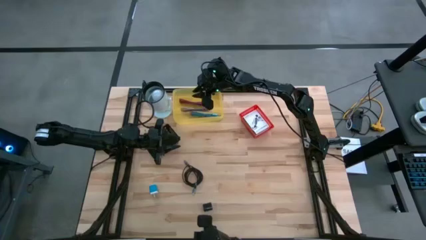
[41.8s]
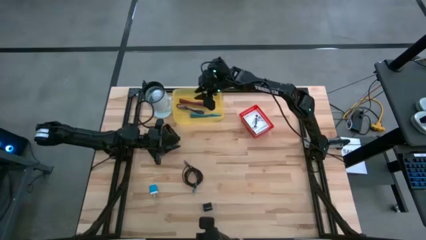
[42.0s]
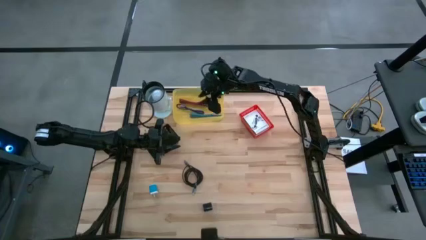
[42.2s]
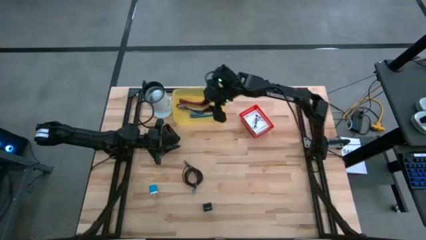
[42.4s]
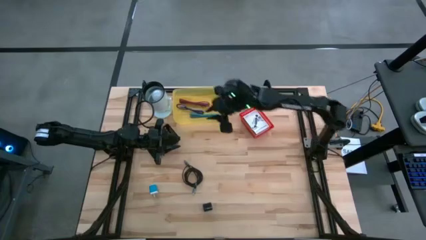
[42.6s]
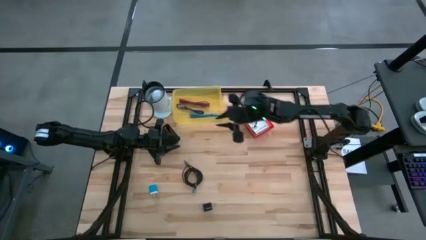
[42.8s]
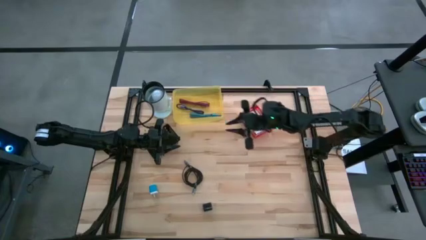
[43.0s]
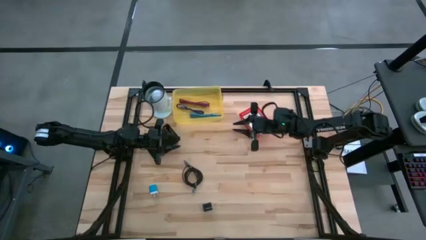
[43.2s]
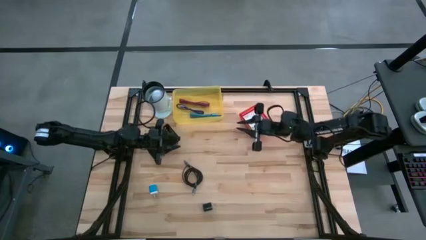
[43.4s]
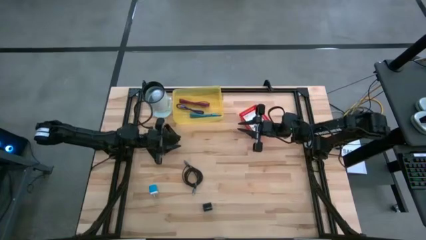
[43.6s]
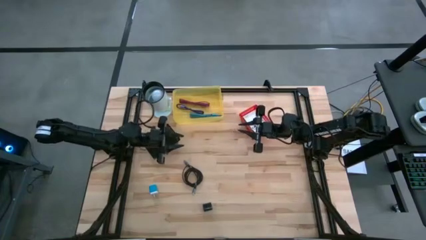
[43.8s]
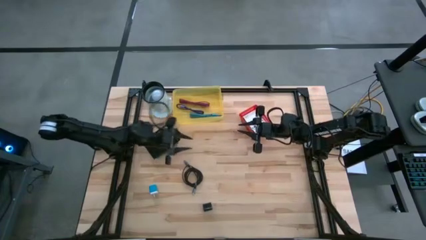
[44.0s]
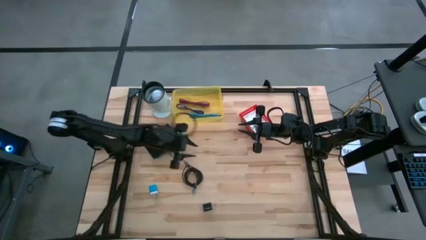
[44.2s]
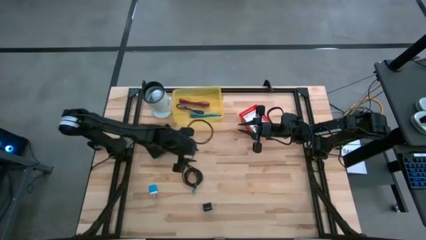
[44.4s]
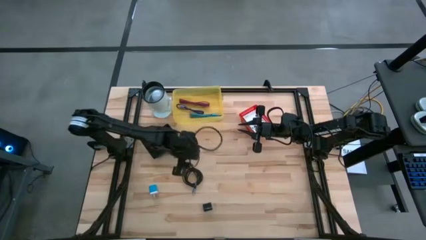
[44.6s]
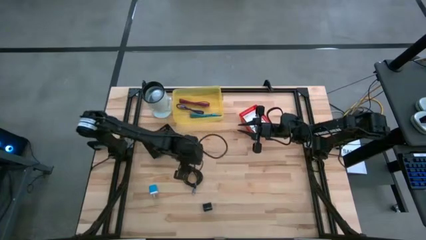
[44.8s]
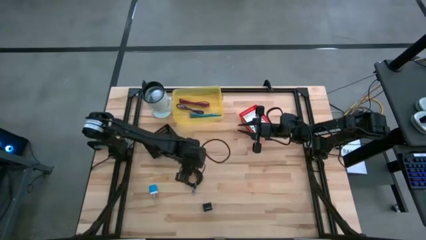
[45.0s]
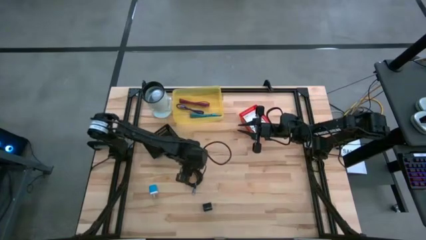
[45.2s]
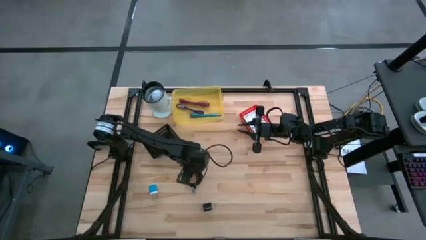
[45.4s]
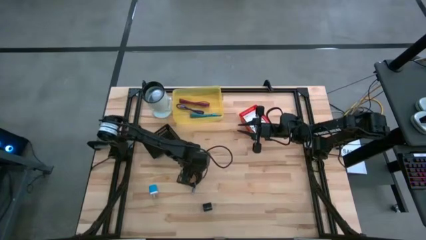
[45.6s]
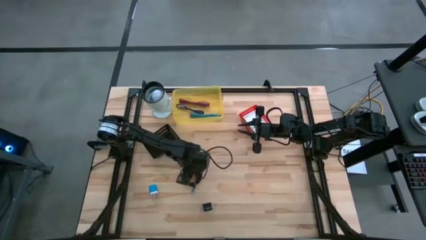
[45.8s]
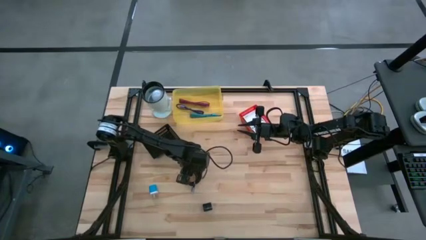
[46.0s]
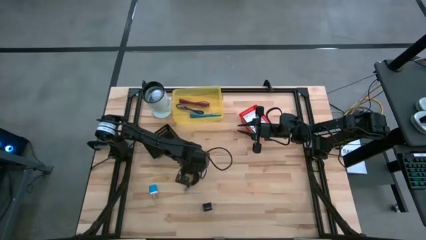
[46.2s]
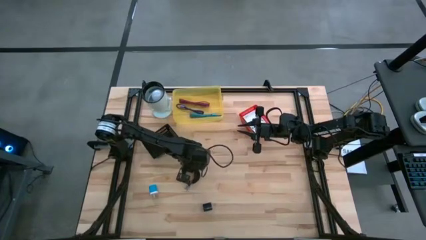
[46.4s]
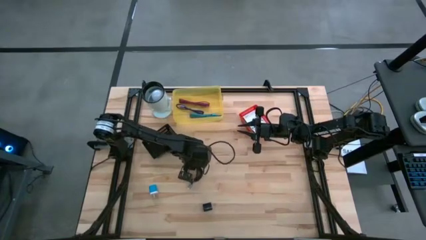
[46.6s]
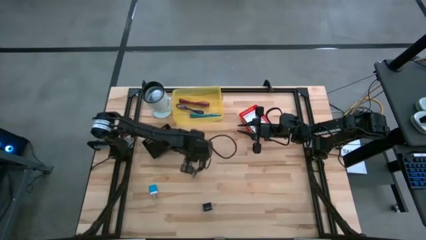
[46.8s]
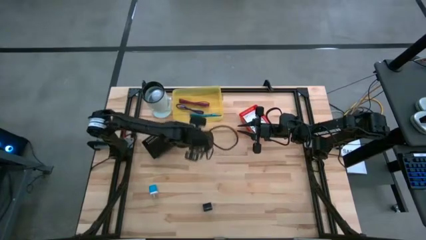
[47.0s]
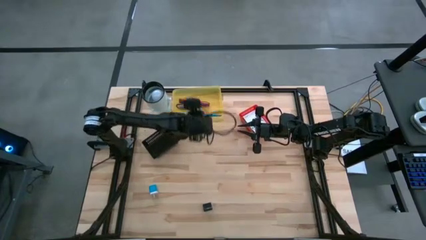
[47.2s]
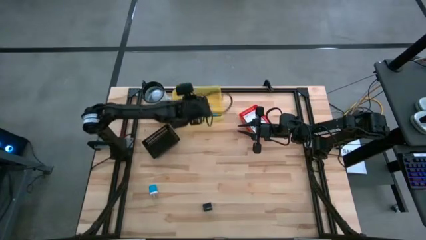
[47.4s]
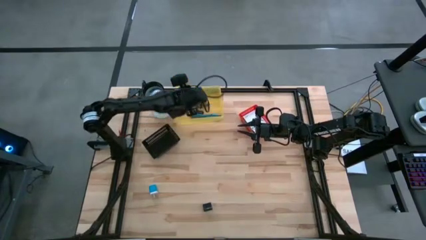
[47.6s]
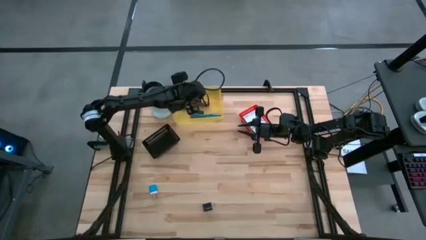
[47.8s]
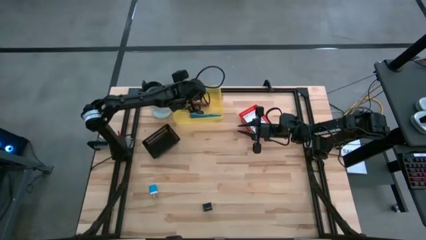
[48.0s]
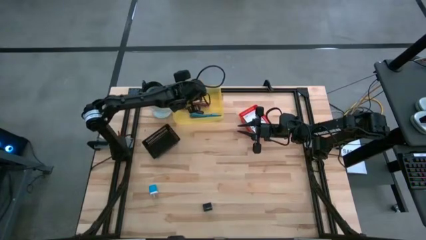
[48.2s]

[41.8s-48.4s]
Task: Pick and place items into bin
Put the black charger cable into the yellow bin

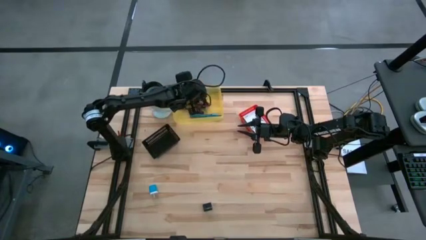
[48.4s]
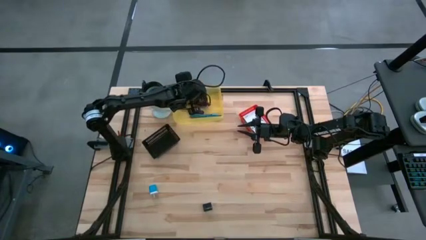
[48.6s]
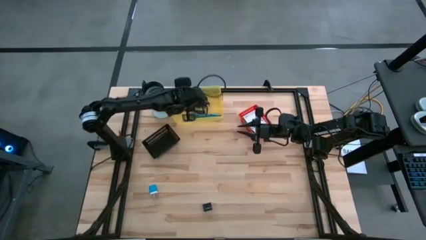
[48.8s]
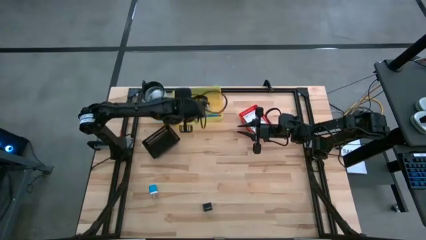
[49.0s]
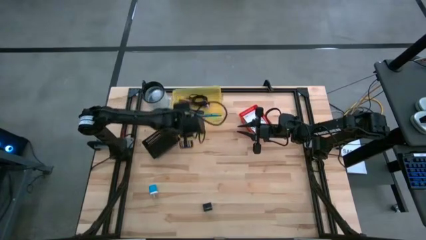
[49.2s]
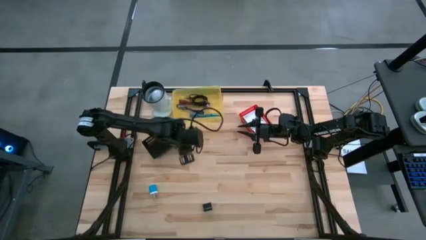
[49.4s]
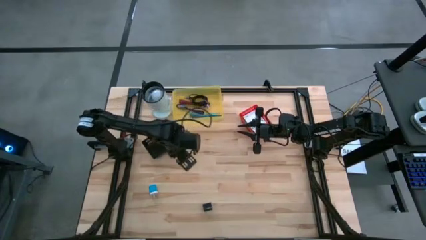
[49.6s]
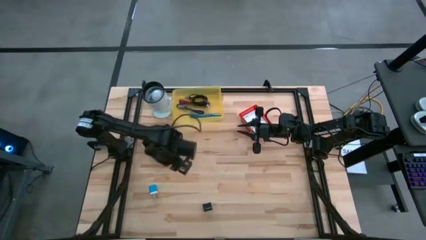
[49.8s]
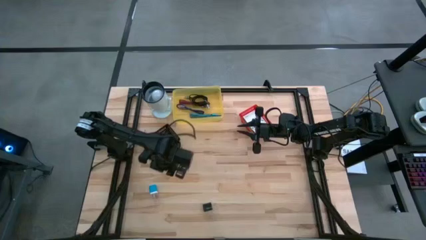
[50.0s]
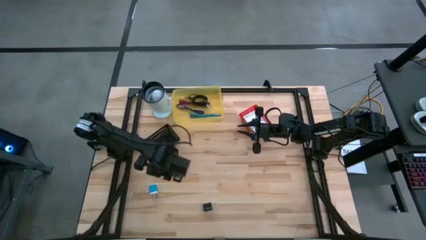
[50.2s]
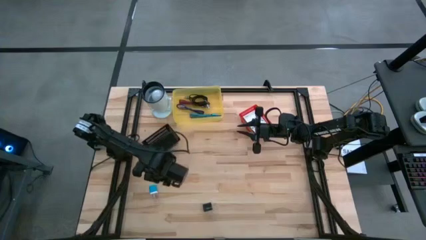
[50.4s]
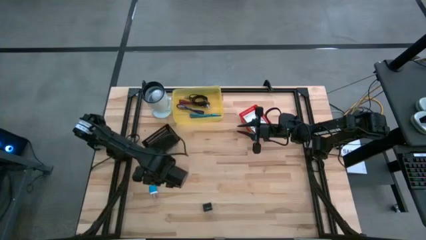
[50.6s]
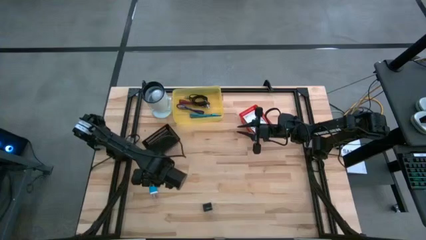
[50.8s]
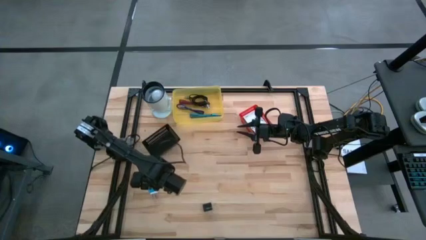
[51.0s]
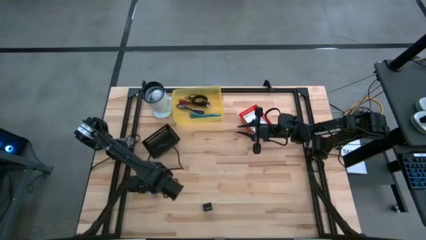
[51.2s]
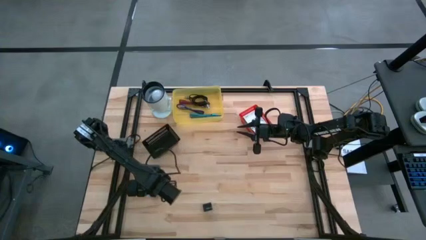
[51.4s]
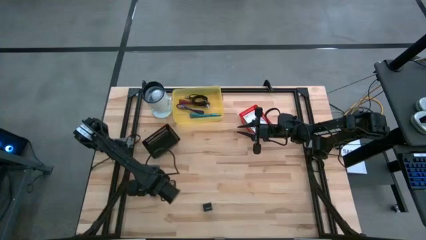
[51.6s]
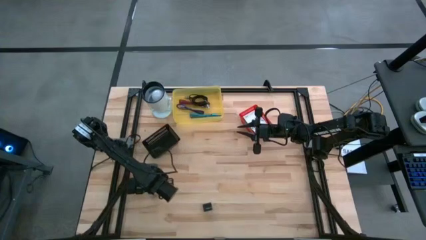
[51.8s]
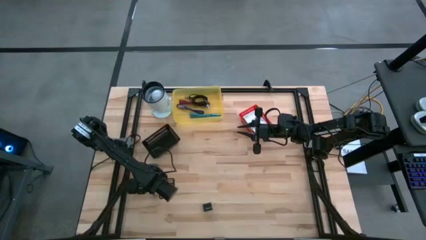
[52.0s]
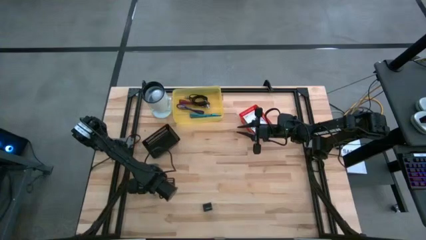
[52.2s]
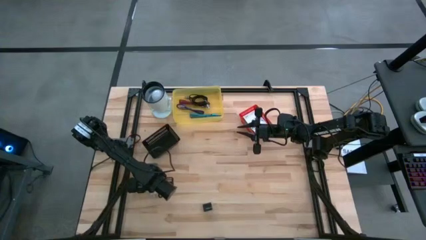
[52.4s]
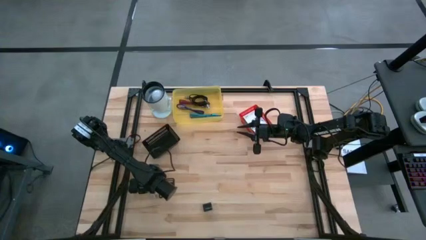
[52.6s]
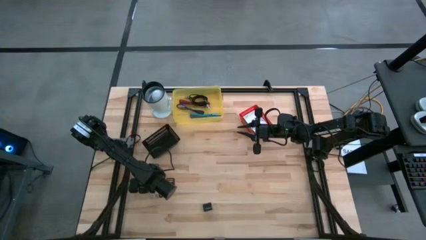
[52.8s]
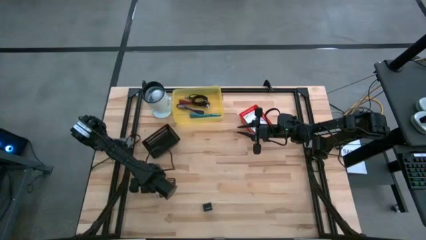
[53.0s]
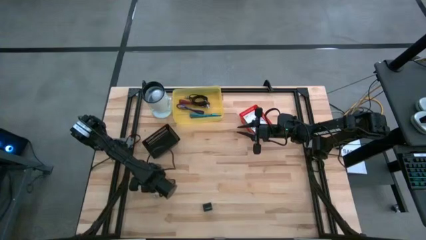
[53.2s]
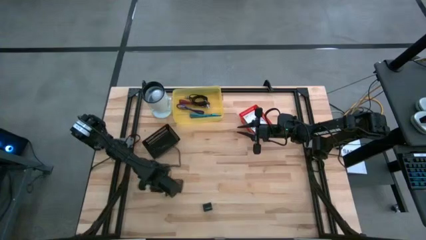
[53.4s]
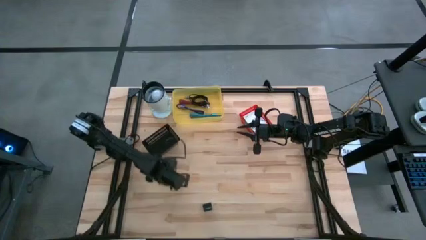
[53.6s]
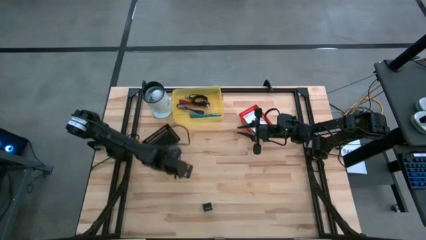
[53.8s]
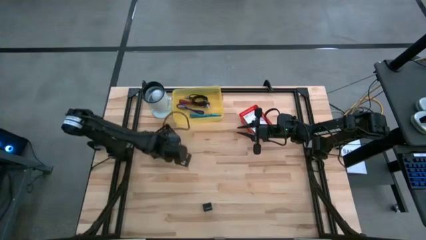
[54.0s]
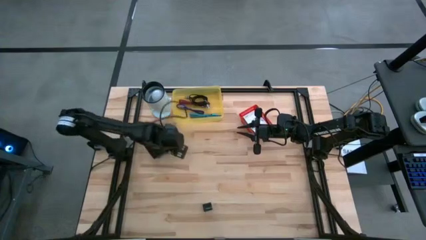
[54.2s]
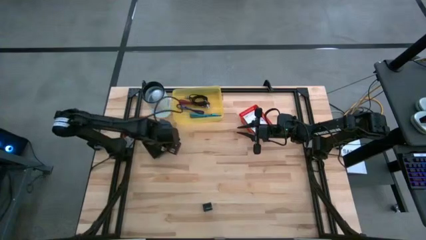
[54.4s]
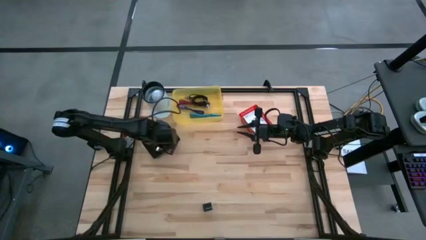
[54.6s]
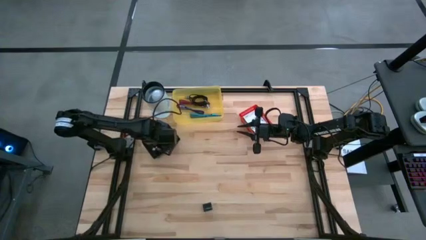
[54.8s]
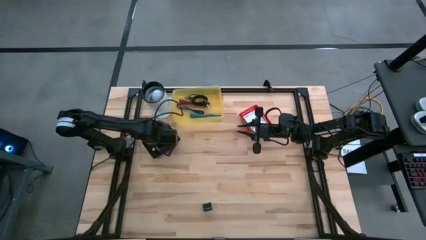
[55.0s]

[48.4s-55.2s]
Put the blue charger adapter into the black bin

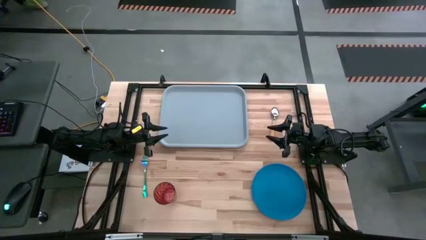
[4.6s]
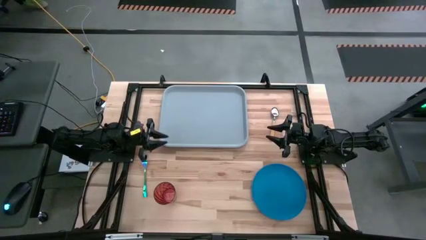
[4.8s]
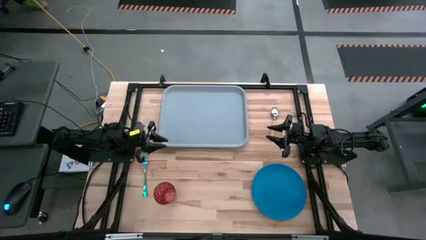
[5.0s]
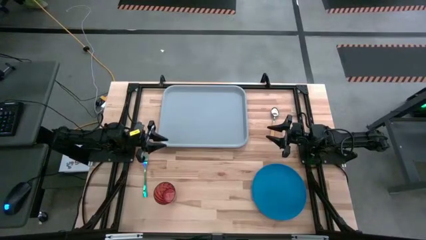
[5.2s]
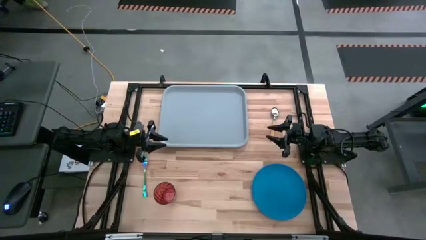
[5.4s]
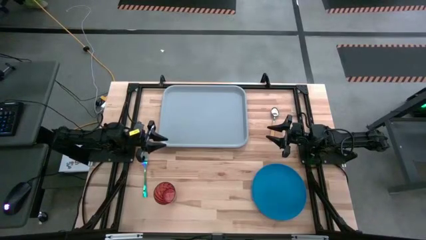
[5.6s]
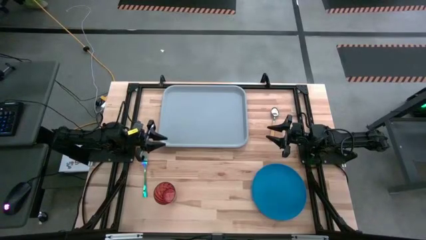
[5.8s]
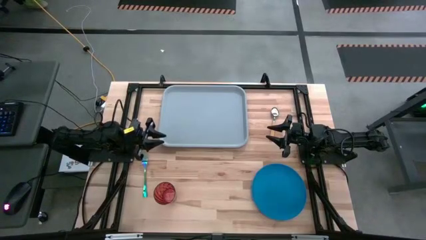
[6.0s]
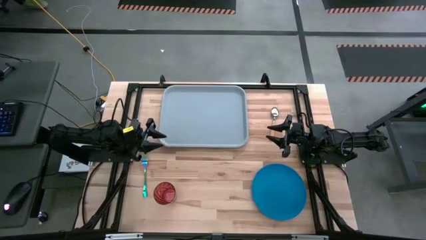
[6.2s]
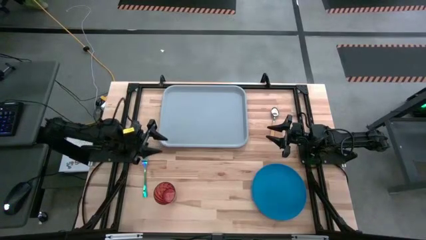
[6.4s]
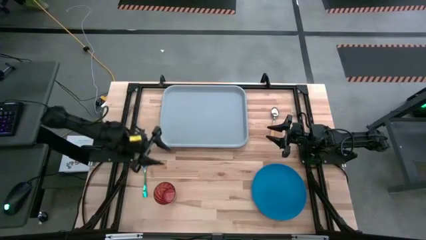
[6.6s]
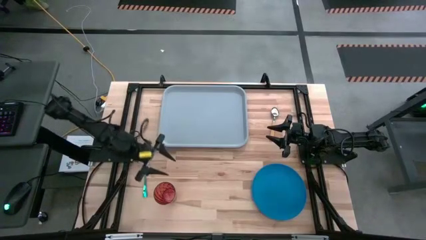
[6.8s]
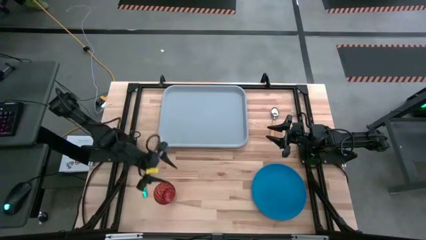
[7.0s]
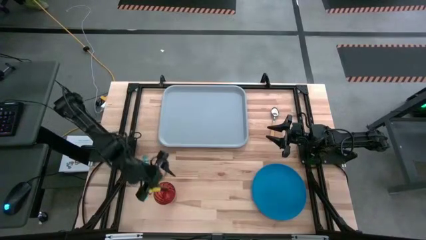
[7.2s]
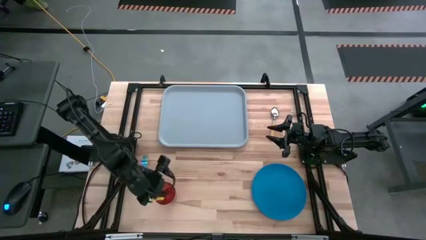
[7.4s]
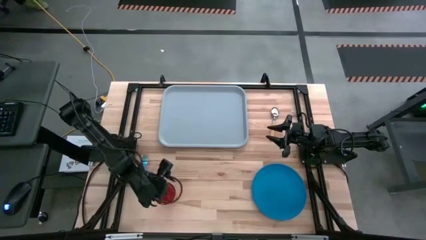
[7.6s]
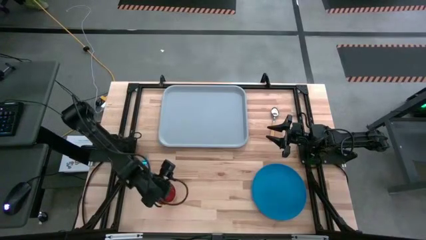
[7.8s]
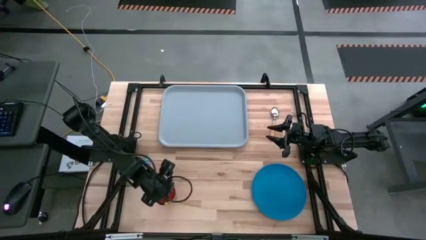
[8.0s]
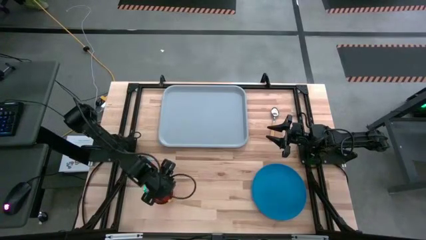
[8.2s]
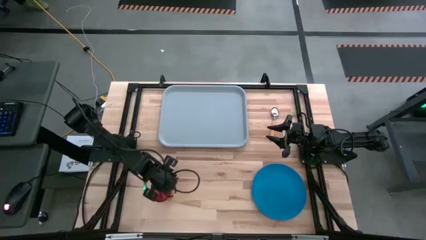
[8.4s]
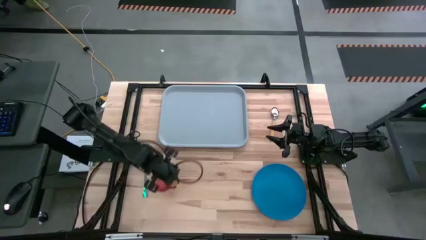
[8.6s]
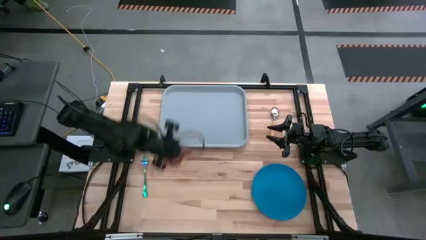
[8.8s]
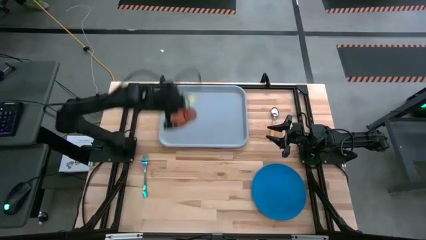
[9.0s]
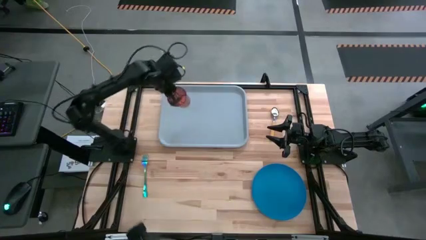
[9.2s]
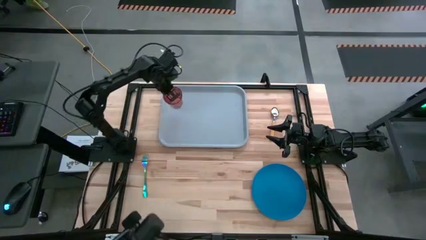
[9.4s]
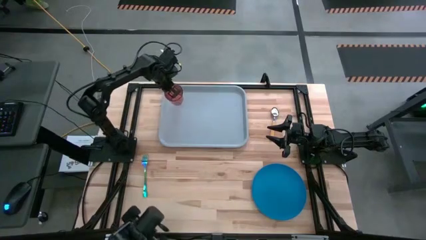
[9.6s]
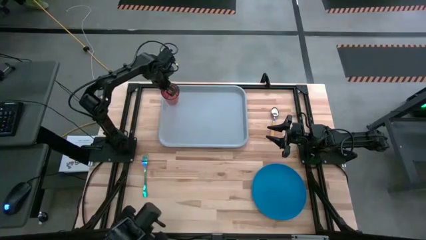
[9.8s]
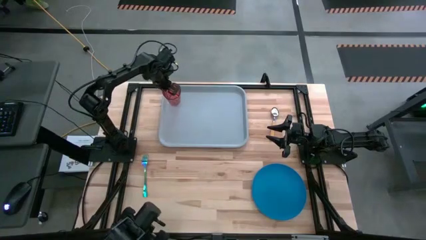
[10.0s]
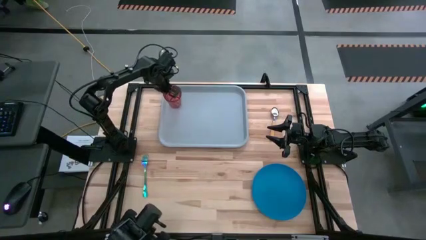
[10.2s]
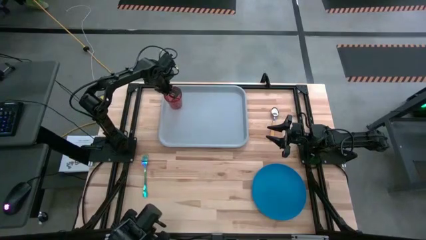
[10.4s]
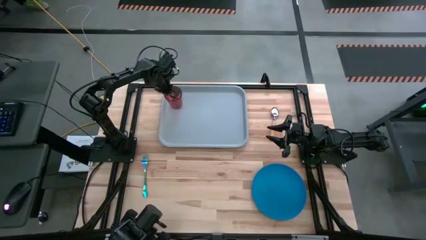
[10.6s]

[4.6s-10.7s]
Task: Pick and place plate/cup/fork/spoon on tray
Put the brown cup on the gray serving tray
